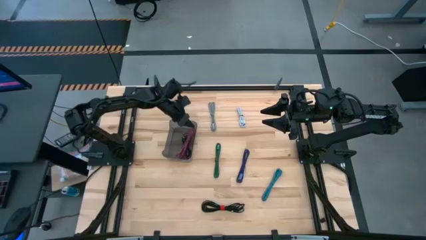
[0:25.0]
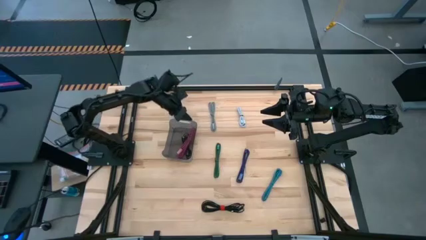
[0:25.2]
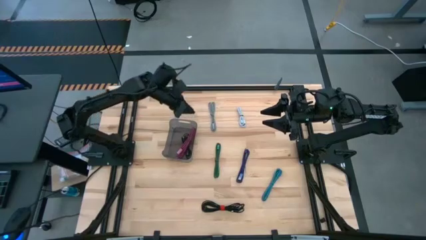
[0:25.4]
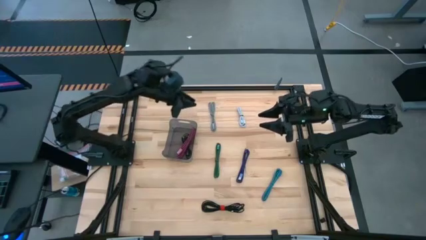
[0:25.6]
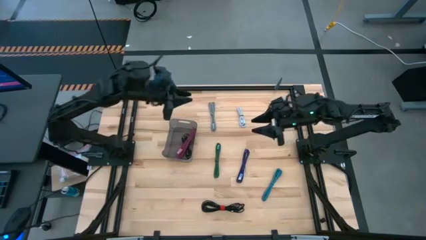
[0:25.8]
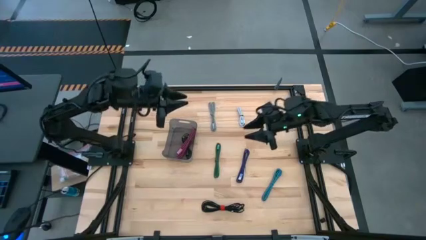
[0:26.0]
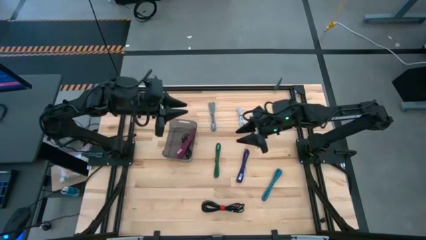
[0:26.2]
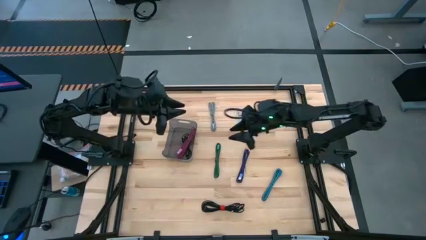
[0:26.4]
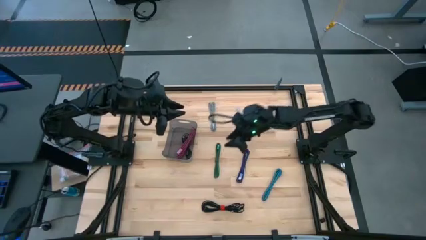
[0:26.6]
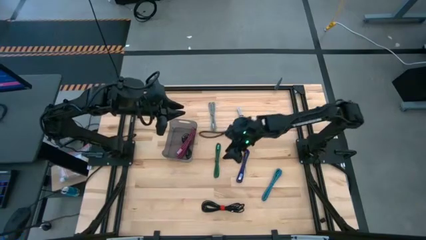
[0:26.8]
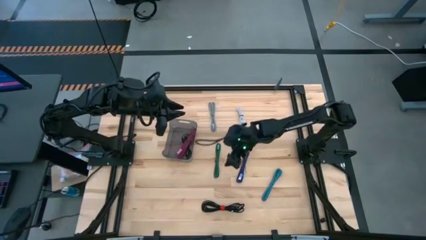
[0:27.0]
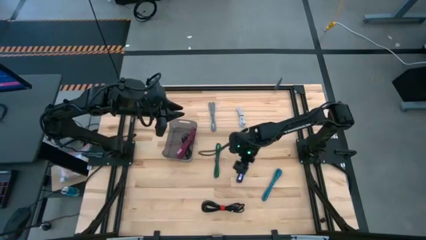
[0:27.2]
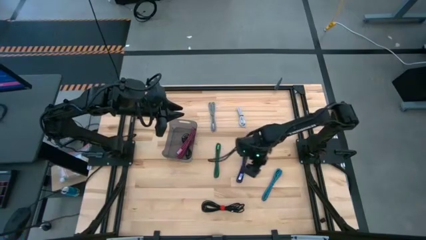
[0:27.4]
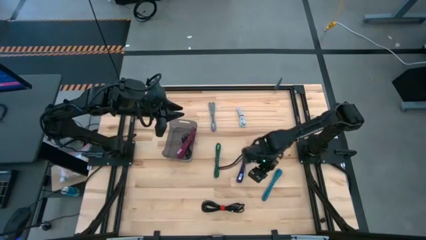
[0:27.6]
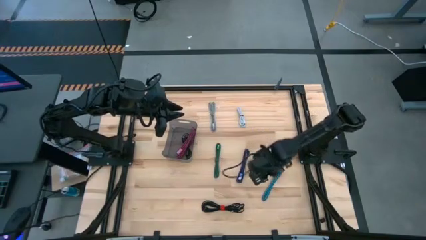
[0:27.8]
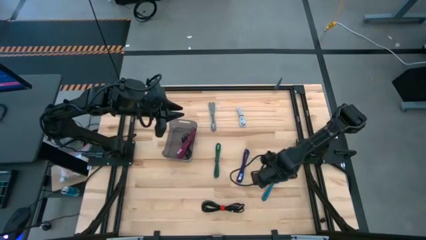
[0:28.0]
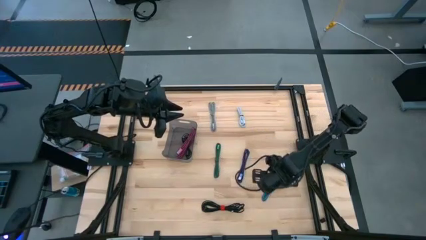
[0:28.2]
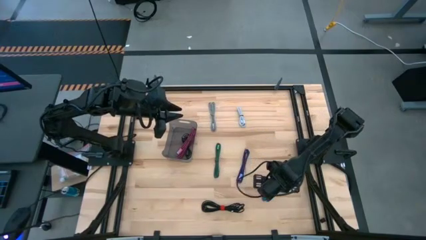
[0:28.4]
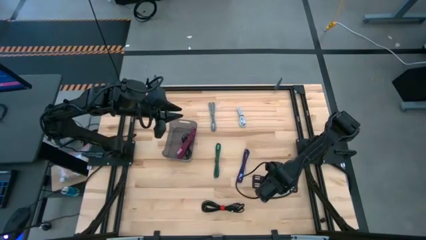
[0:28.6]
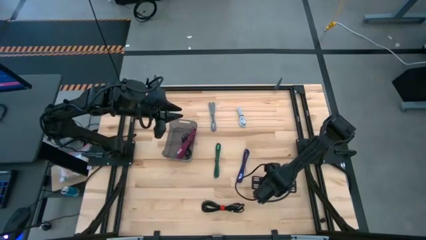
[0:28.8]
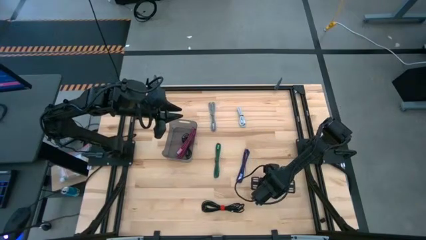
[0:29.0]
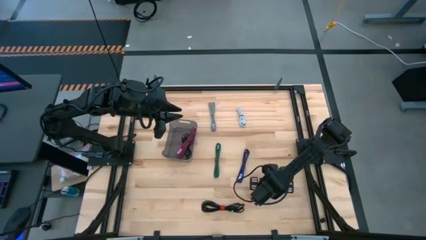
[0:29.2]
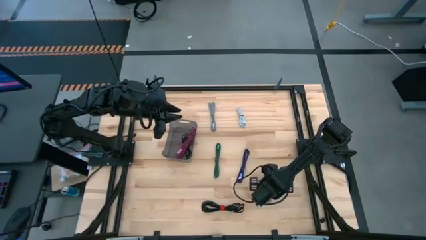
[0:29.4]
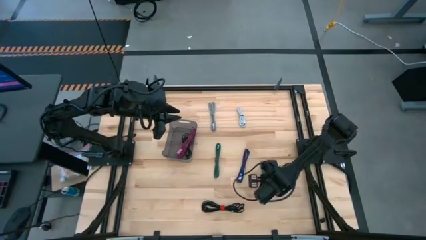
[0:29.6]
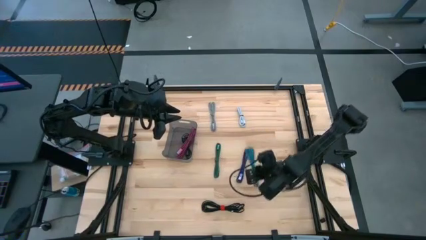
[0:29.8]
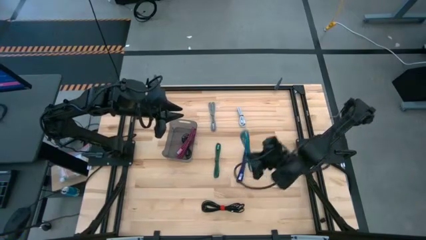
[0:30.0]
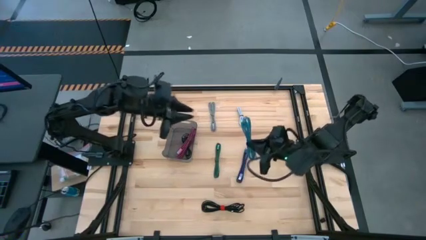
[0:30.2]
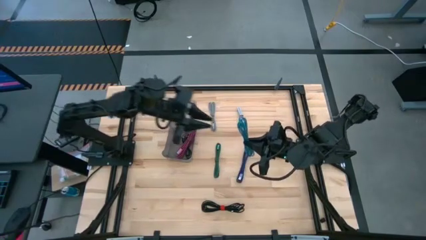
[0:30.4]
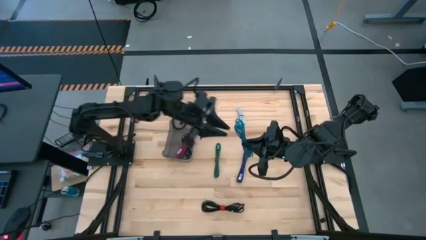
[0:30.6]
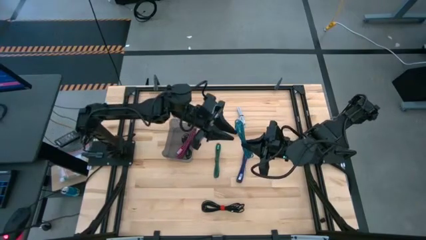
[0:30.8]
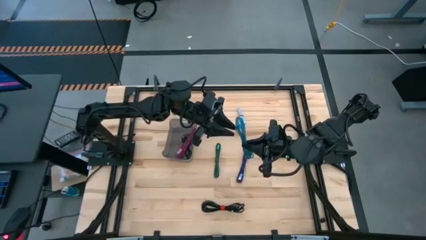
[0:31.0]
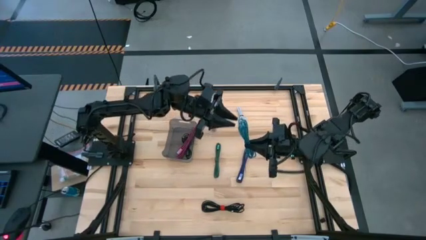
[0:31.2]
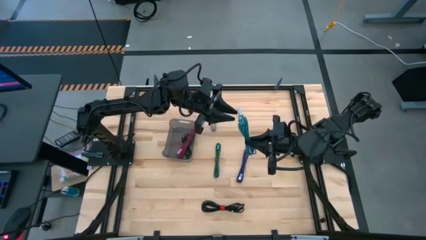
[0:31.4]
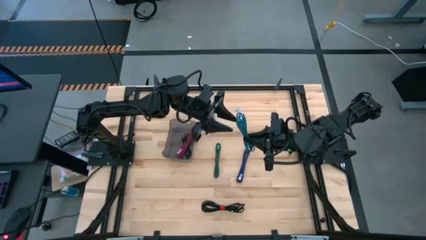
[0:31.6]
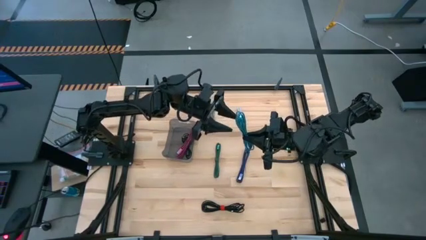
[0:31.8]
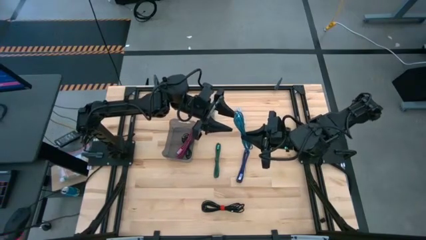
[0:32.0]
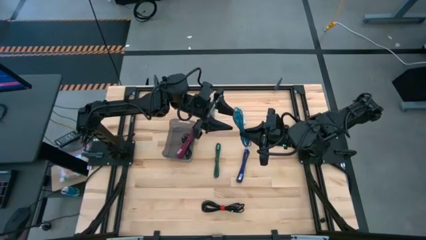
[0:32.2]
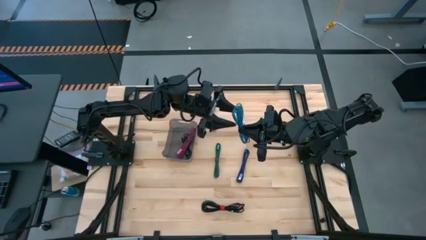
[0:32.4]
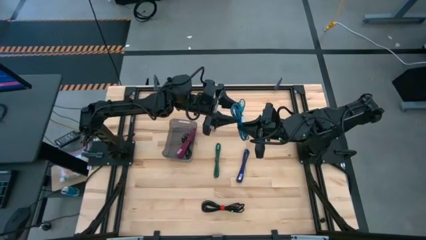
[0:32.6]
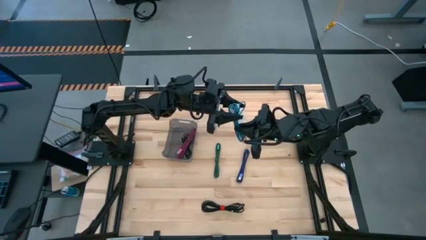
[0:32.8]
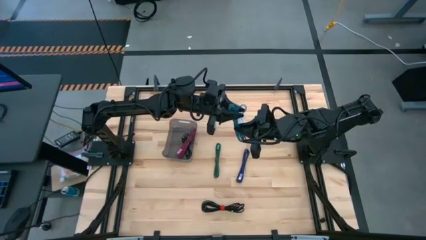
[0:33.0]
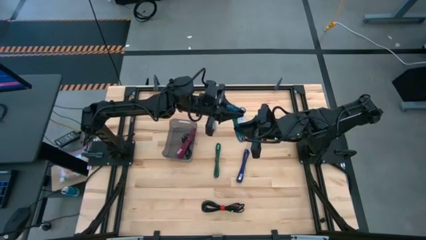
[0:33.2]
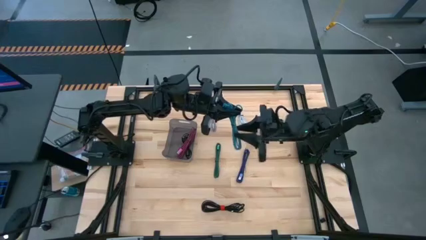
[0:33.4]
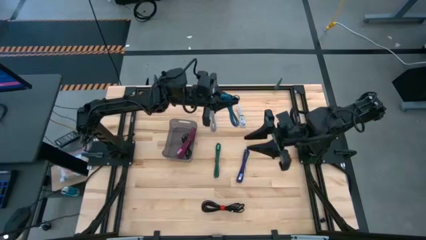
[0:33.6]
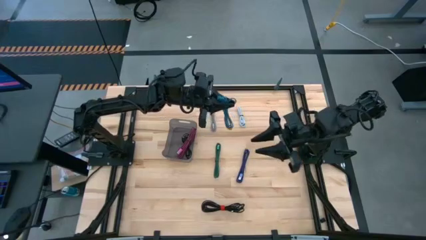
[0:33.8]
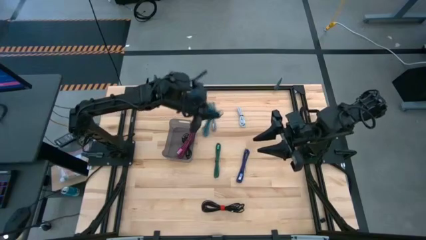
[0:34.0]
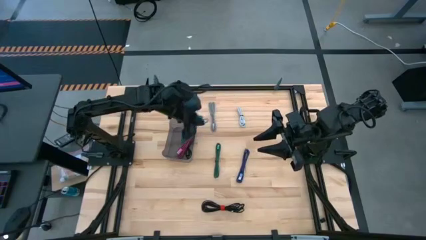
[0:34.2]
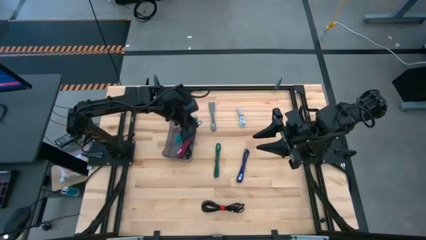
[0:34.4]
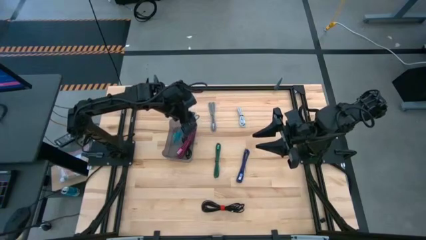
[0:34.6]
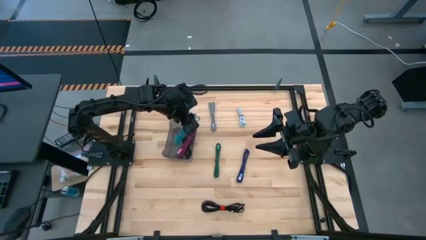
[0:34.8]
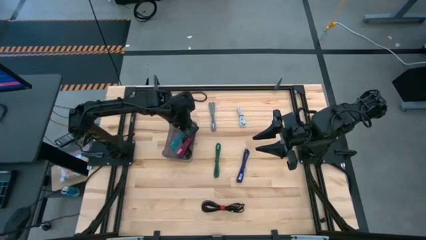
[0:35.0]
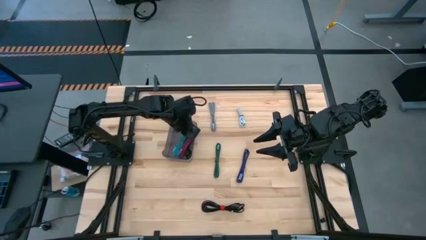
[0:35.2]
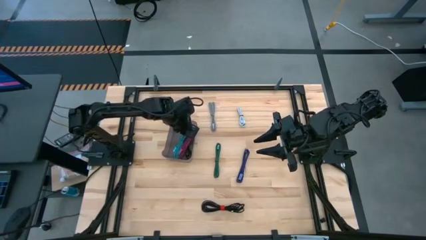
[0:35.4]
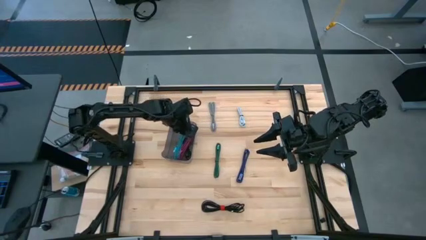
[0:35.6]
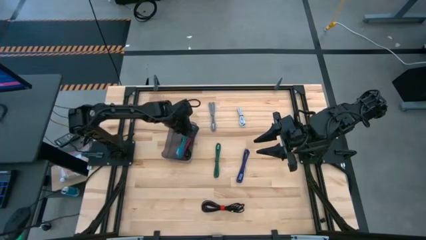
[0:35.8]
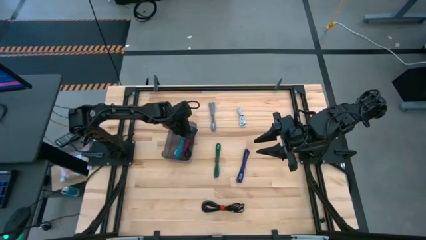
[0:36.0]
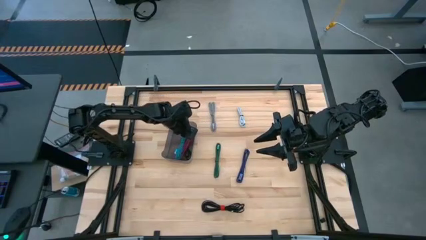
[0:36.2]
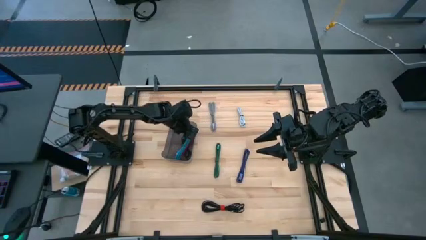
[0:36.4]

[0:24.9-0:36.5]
Task: Pick and place USB-C Cables
Put the blue USB cable into the black bin
